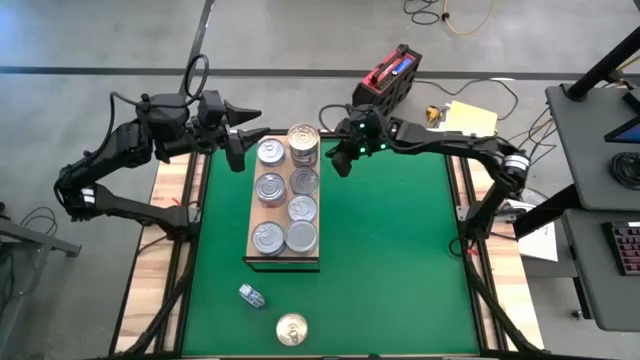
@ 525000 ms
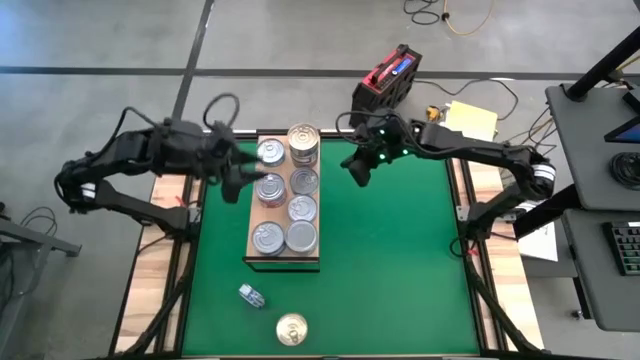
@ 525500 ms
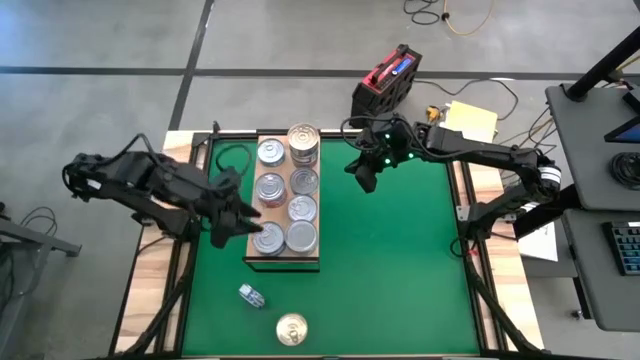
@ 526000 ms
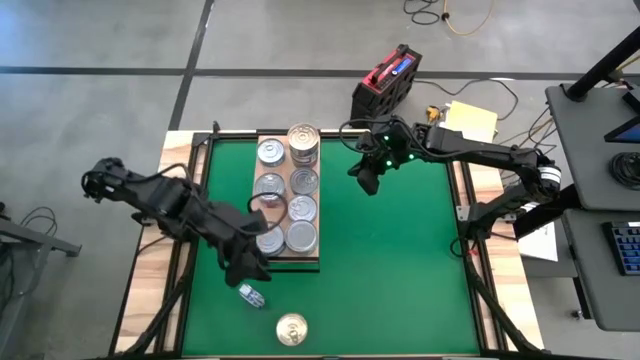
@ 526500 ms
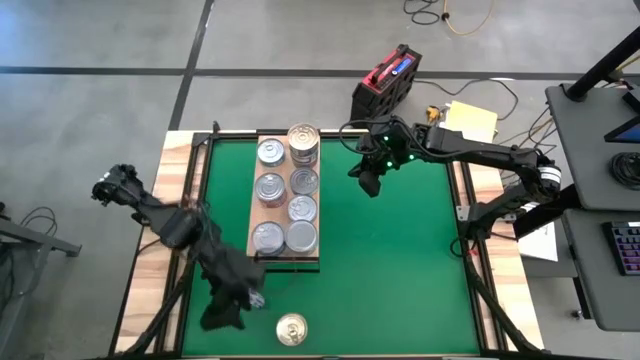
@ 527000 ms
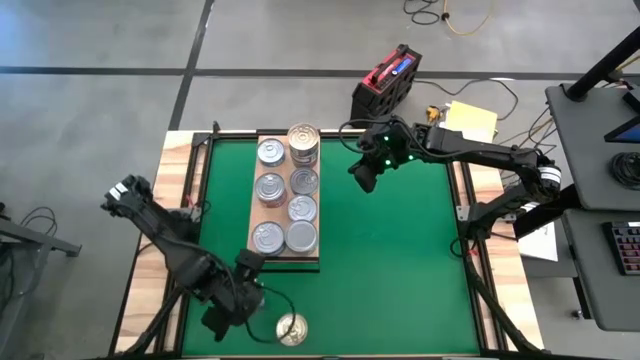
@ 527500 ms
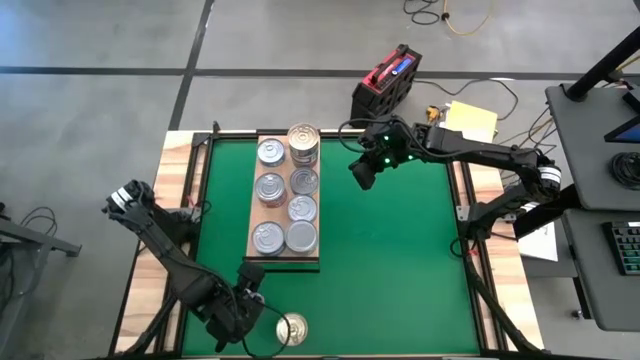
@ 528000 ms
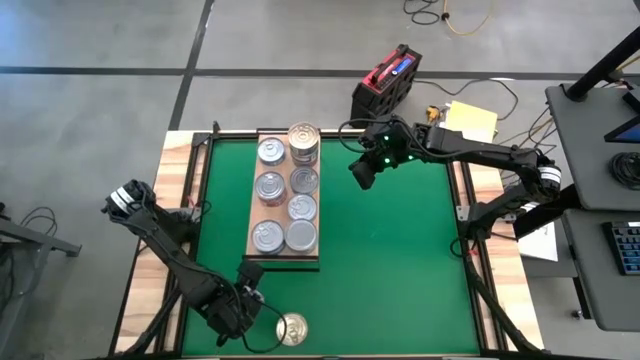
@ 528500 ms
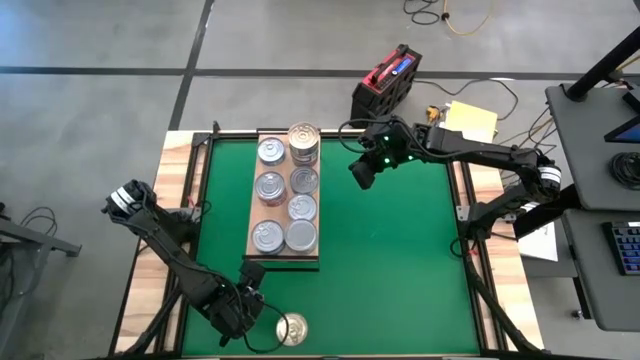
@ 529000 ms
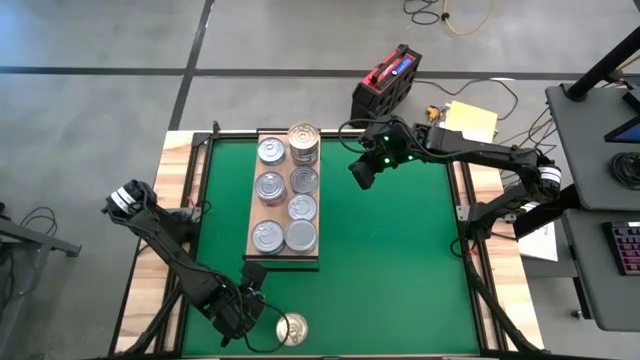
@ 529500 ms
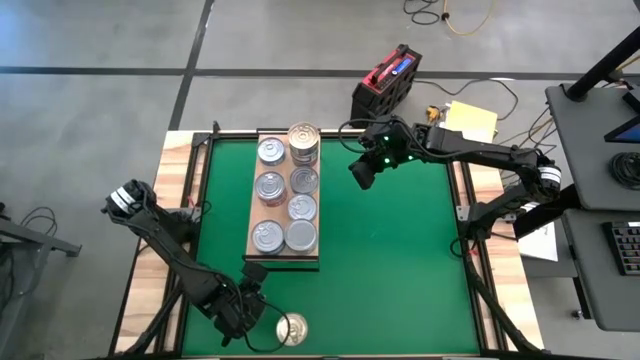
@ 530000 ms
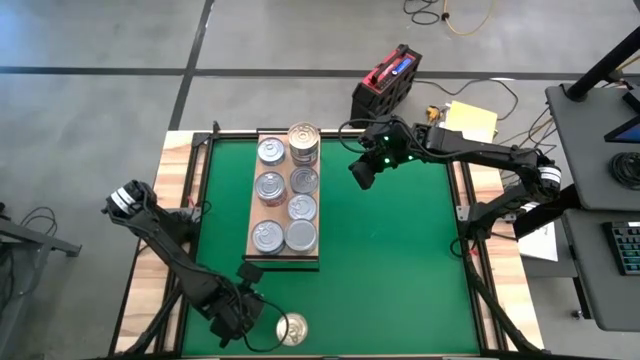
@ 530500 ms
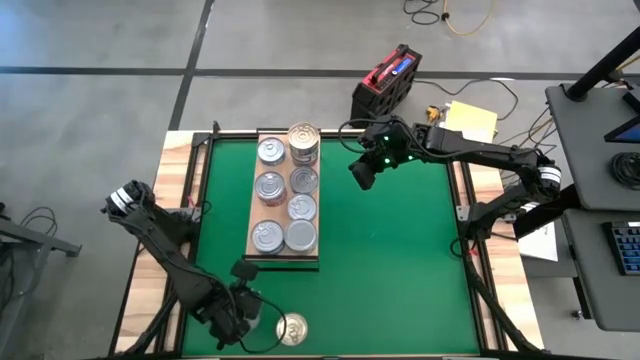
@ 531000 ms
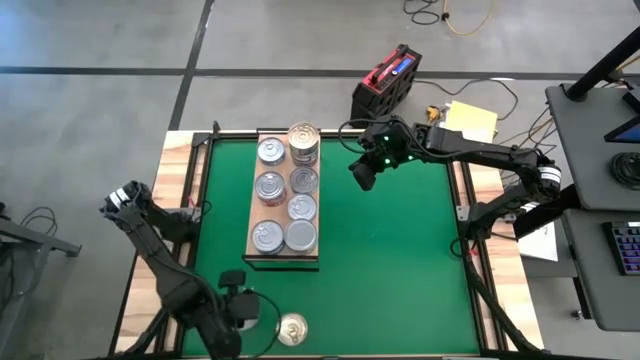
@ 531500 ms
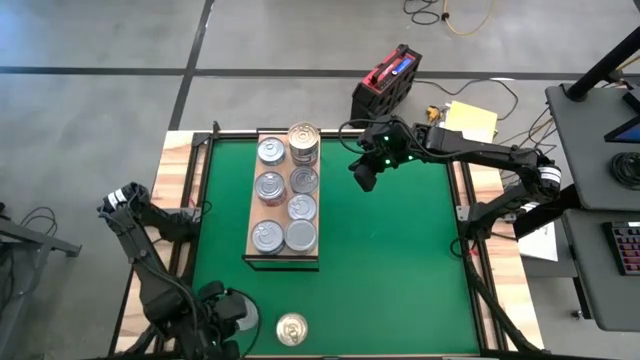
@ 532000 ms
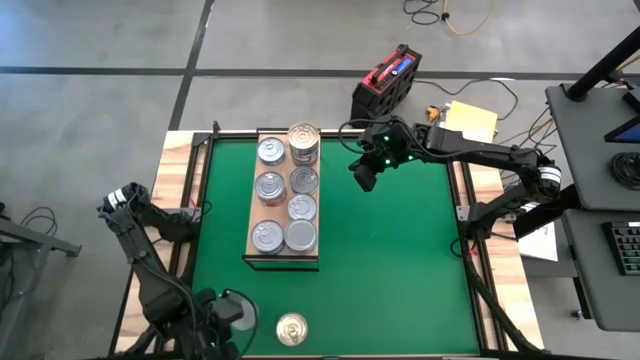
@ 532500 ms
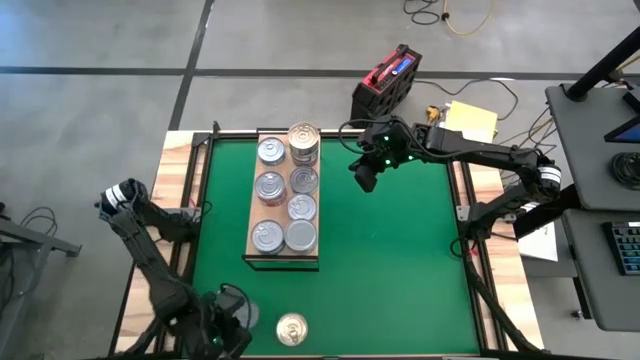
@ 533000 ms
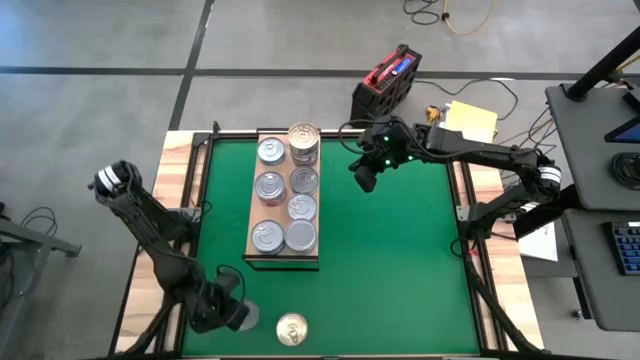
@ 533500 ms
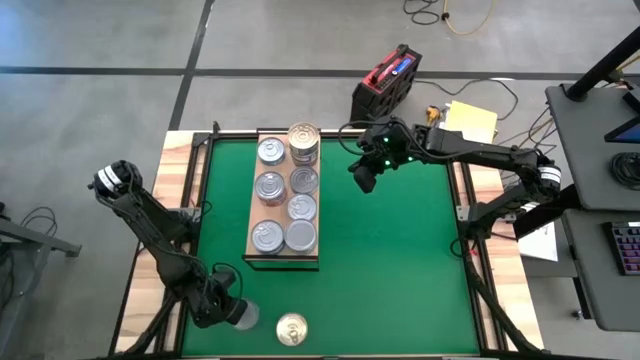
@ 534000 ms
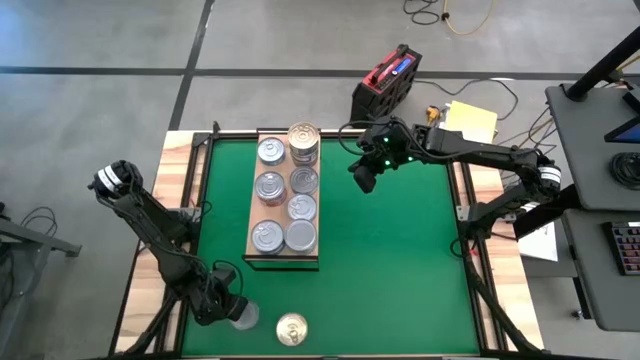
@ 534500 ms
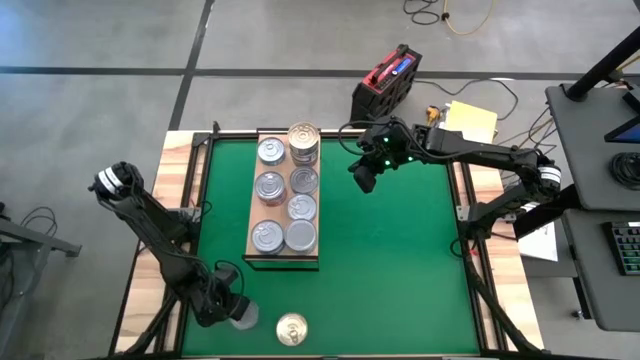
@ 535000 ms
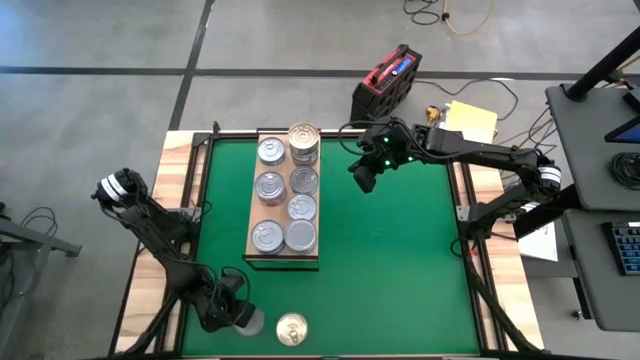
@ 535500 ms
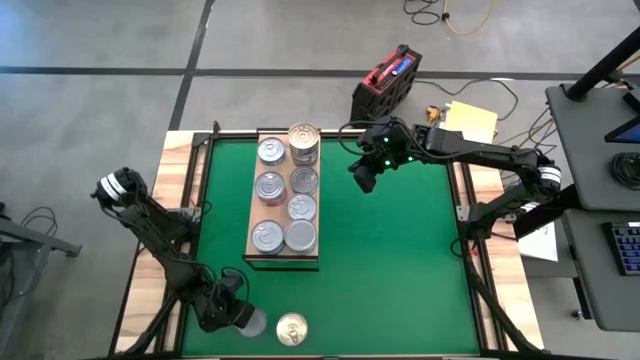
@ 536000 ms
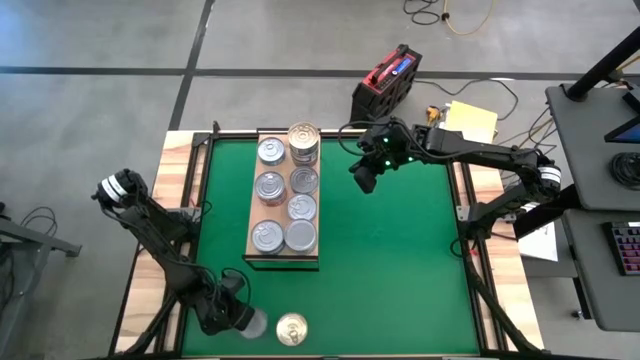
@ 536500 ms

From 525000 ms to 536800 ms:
Task: Stack canned seafood by type on shelf
Stack the blue tuna can on the blue tuna cans on the shelf

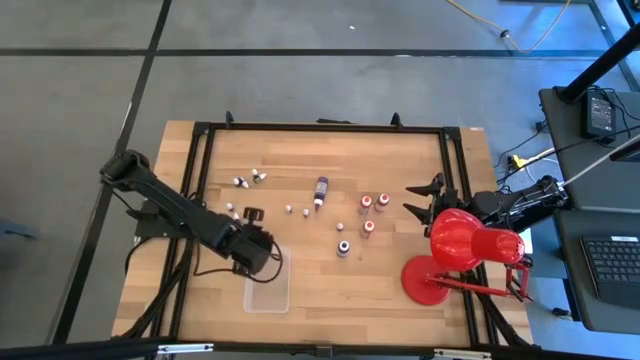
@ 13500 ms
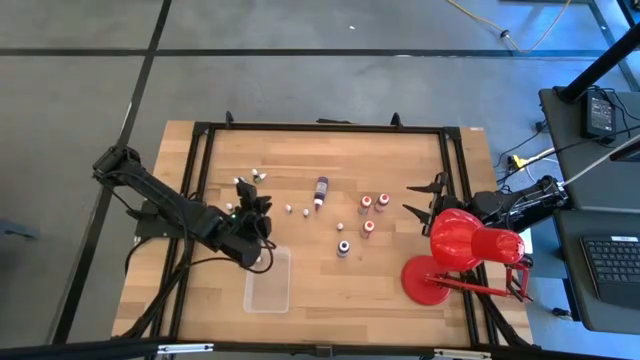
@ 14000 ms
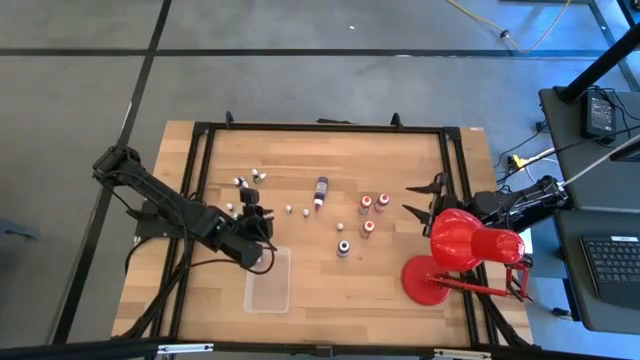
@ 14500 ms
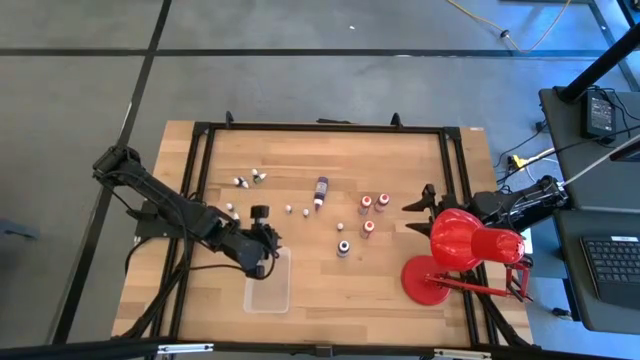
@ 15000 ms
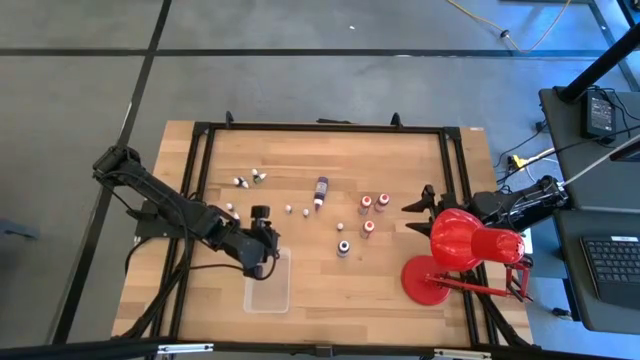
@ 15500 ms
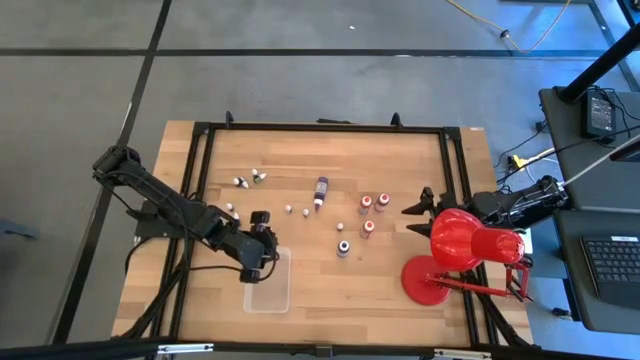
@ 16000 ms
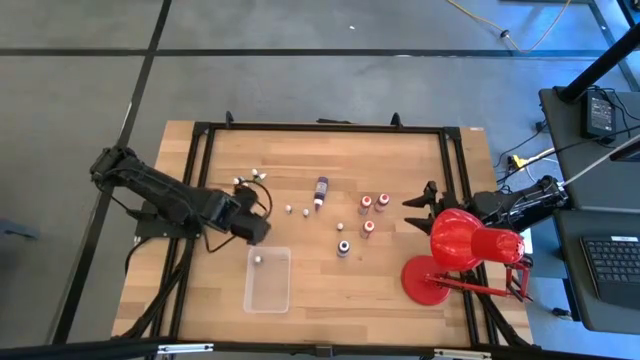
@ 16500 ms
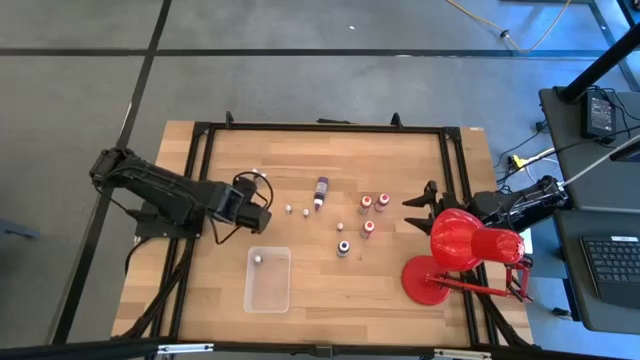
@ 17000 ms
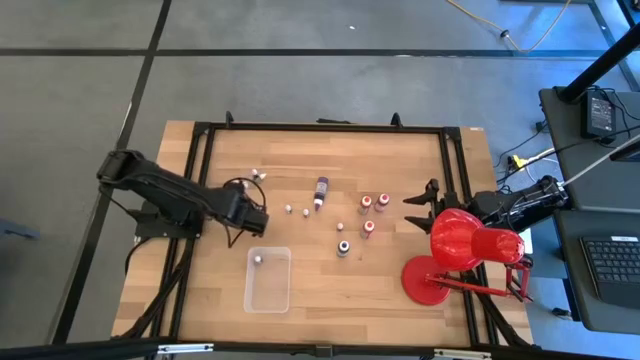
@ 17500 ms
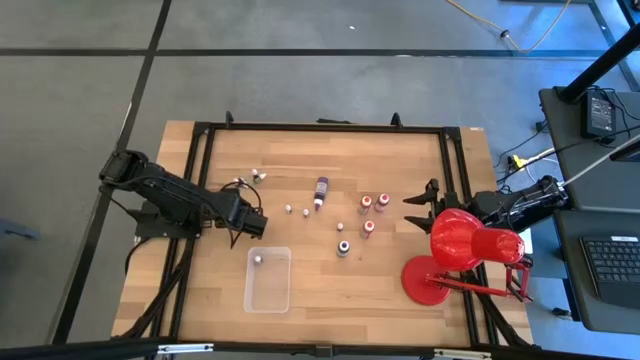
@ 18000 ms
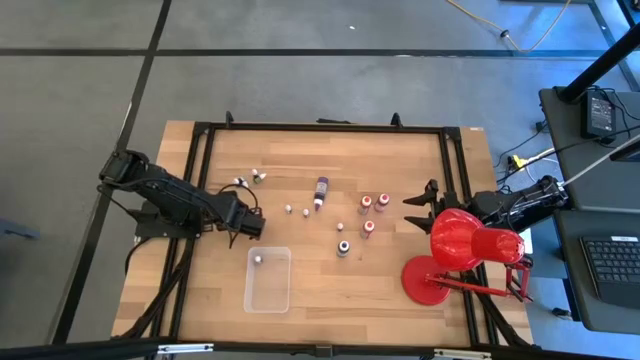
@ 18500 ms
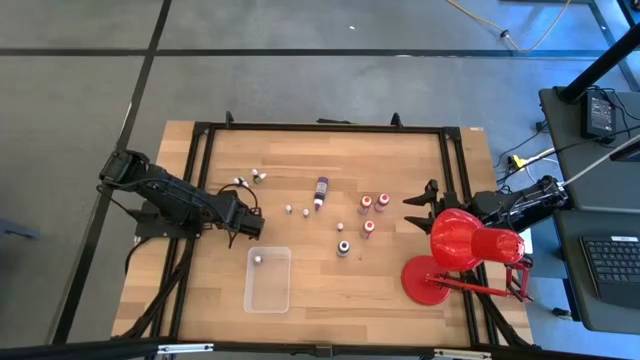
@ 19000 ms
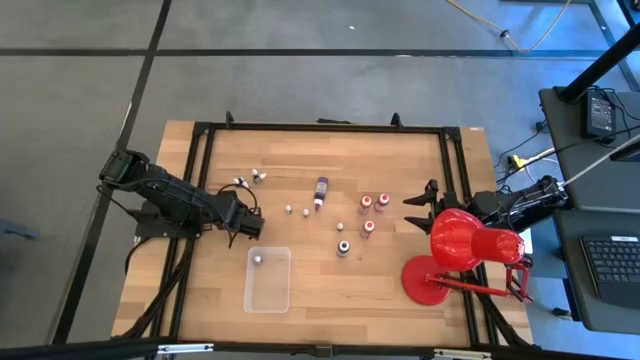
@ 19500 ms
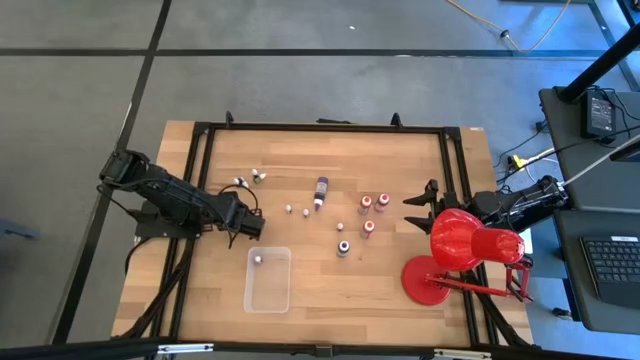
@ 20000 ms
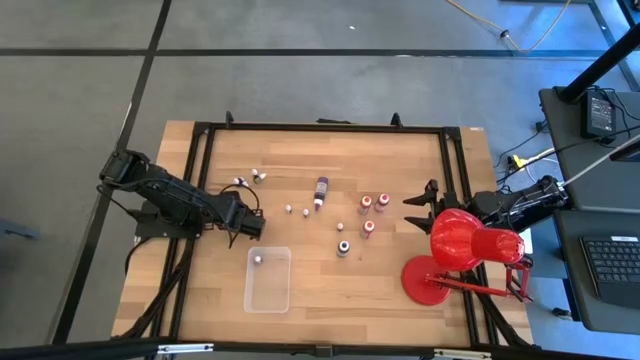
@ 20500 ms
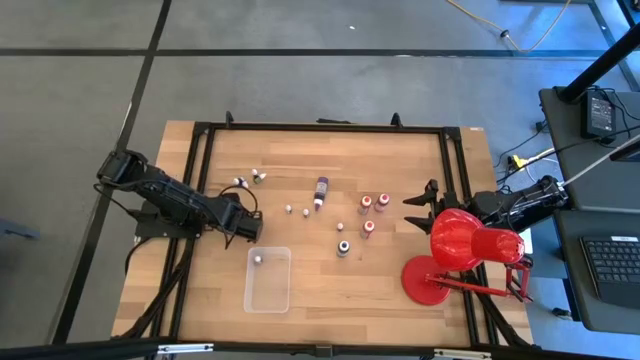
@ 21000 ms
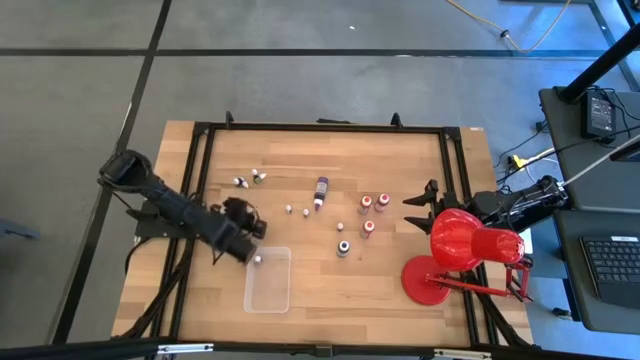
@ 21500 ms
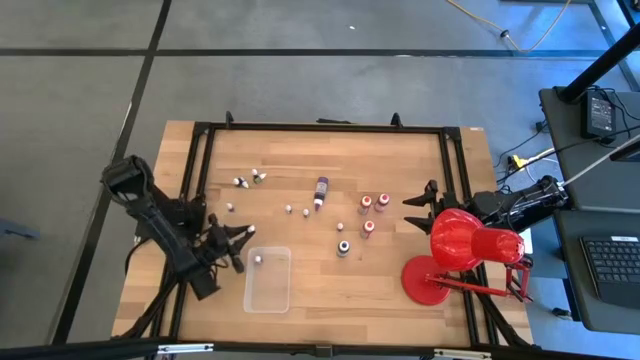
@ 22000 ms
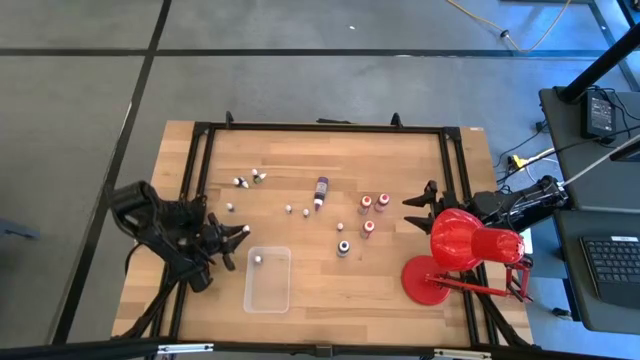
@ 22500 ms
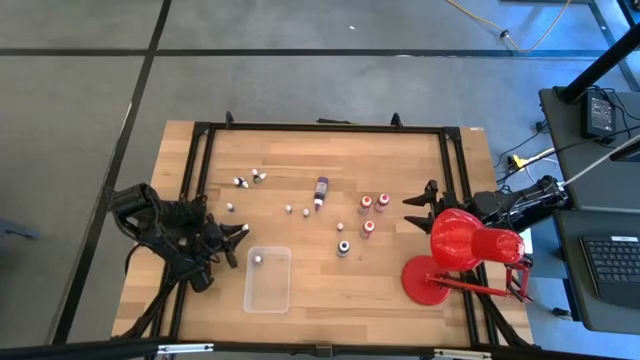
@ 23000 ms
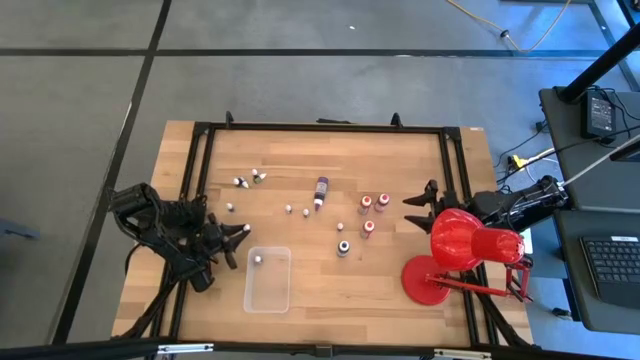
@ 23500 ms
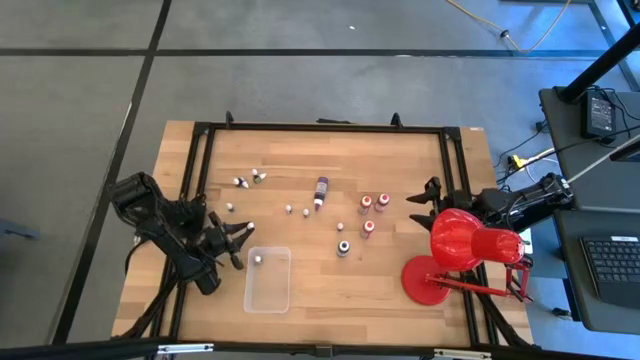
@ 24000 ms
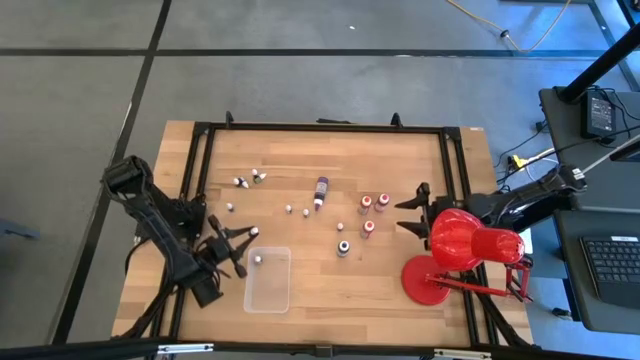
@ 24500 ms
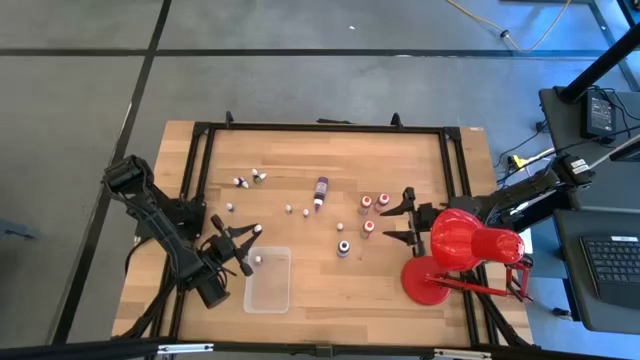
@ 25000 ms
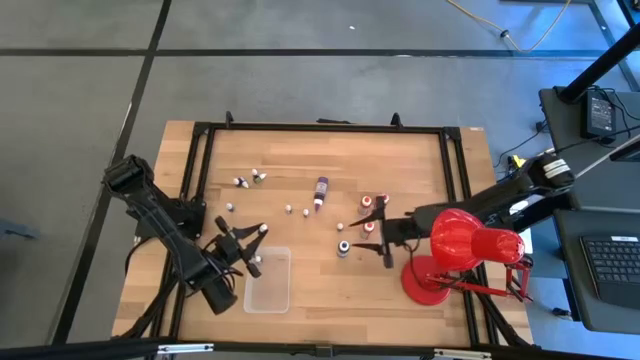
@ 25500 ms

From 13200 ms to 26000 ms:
Task: Pick & Place food coloring
Put the small red food coloring bottle into the bin
